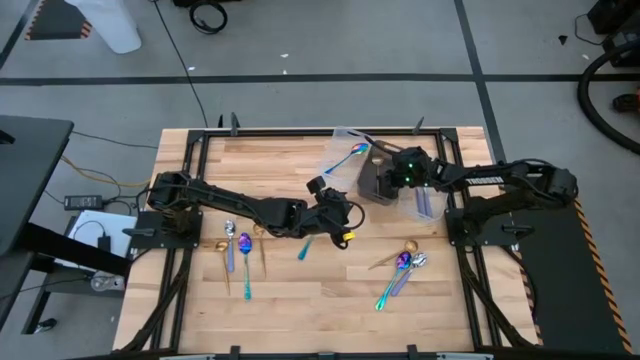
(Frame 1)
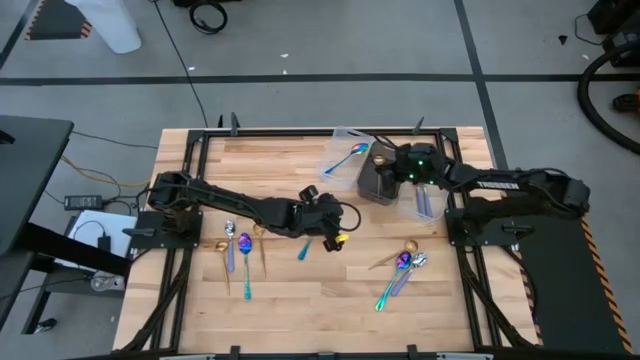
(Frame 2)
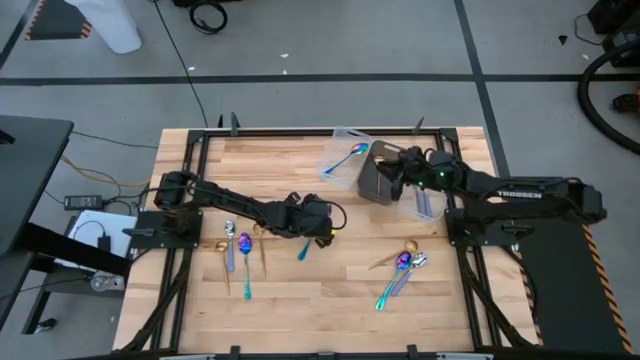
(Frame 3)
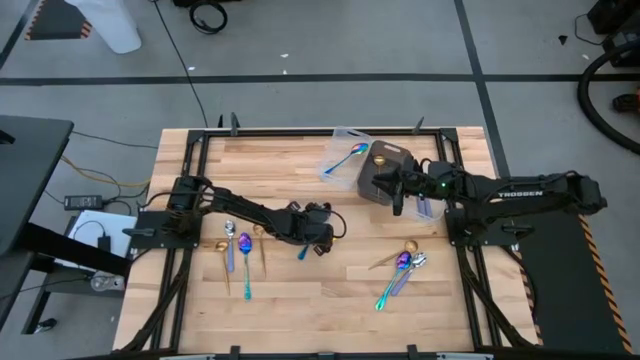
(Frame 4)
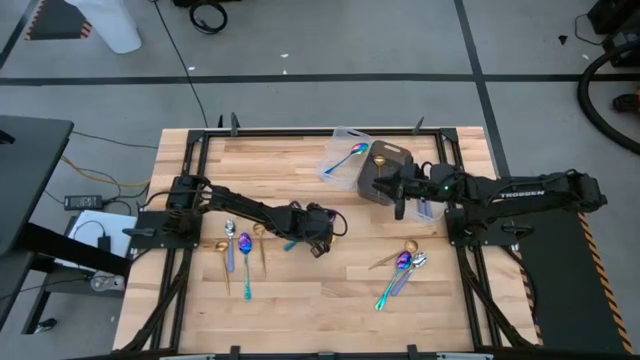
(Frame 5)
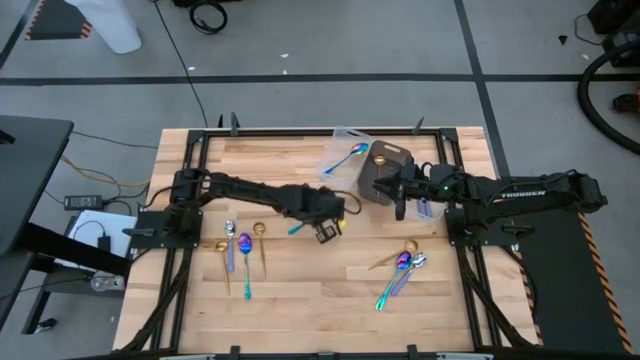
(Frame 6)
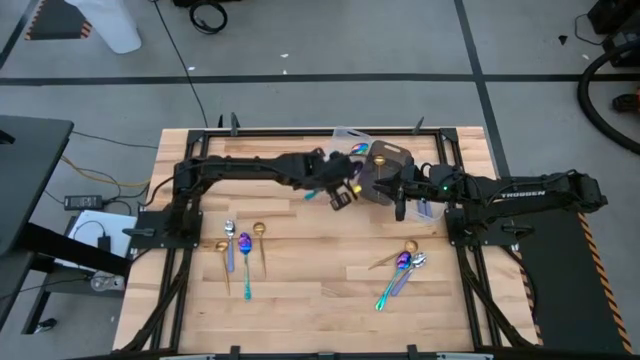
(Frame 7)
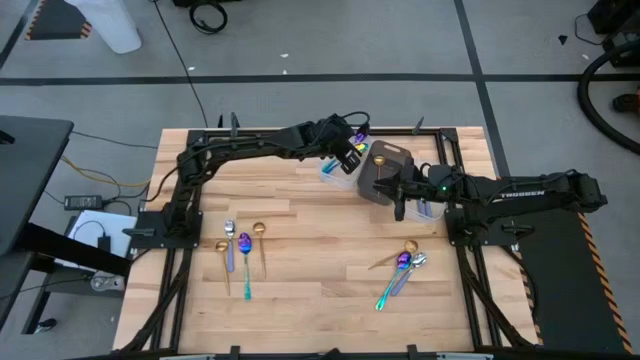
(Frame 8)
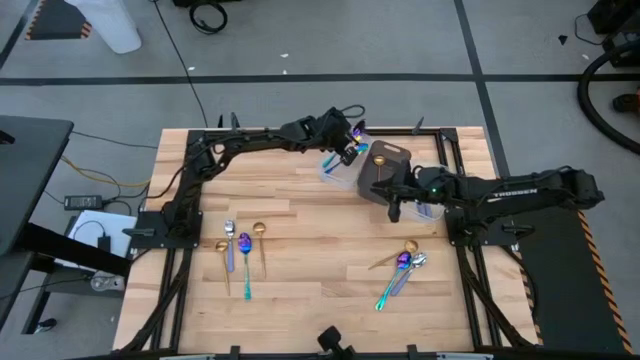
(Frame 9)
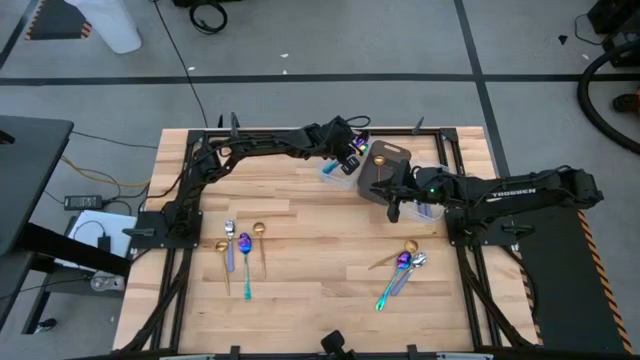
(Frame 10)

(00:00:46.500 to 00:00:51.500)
Task: Sort silverware by color (type)
Put the blue spoon into the left transparent bin

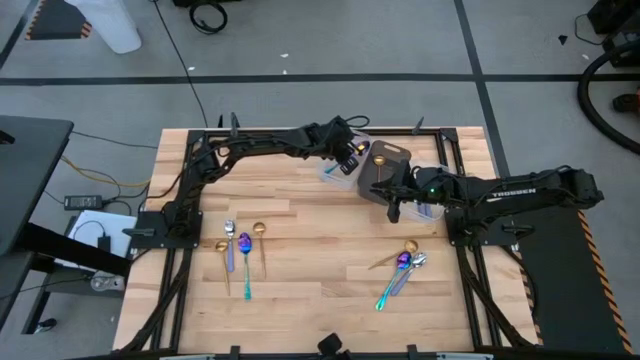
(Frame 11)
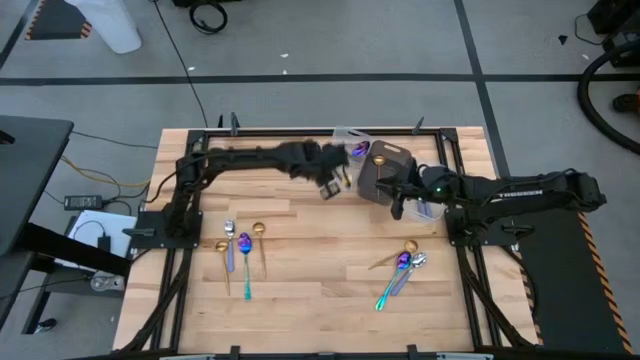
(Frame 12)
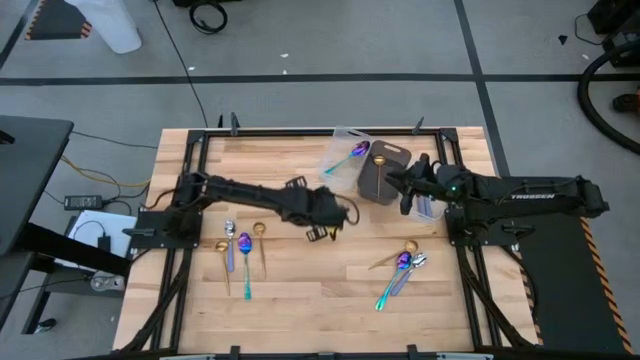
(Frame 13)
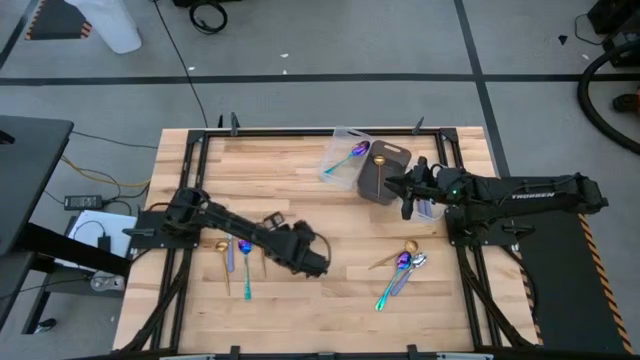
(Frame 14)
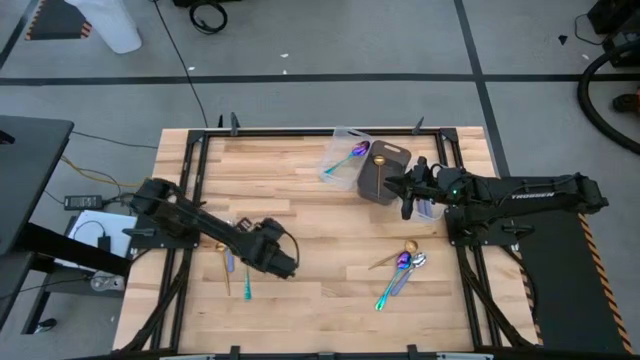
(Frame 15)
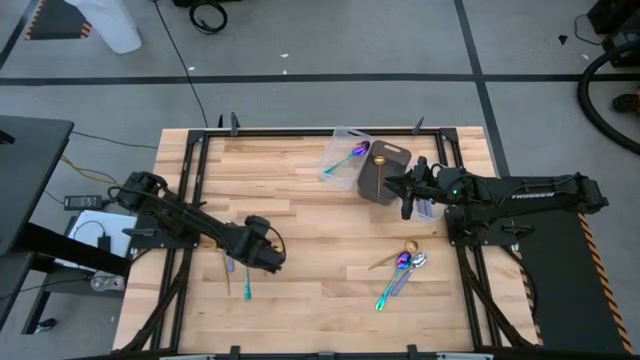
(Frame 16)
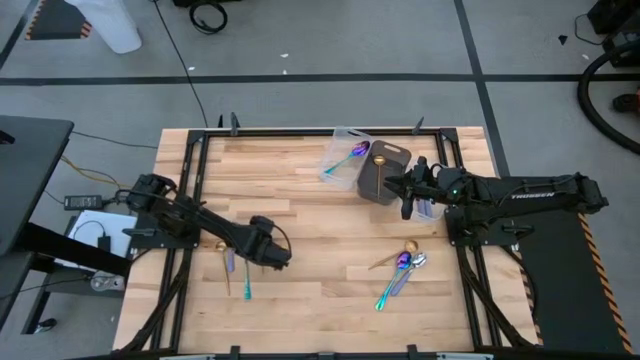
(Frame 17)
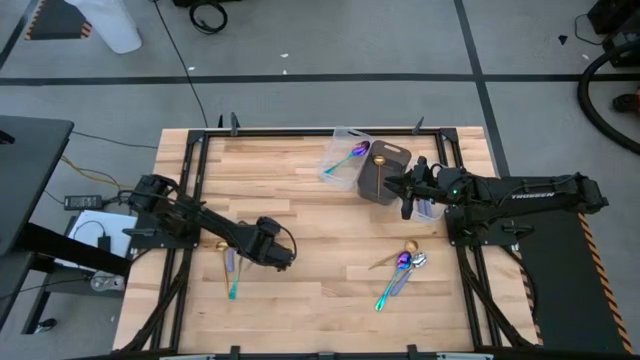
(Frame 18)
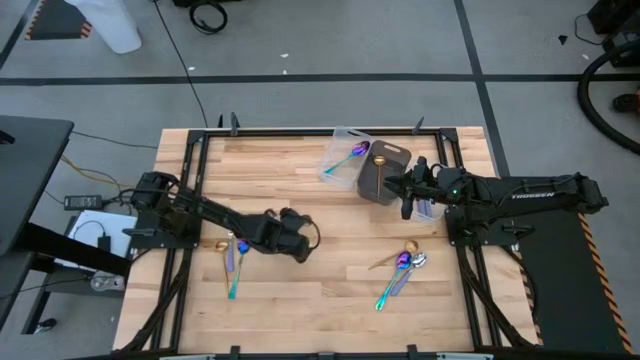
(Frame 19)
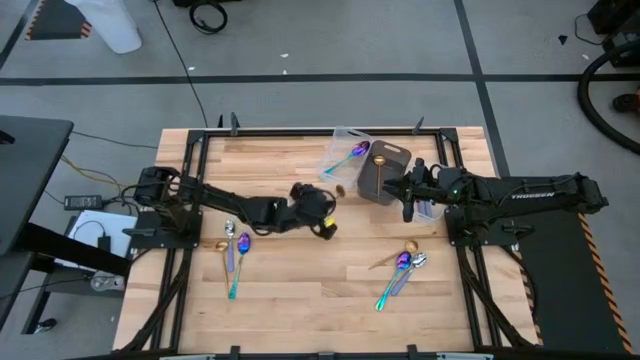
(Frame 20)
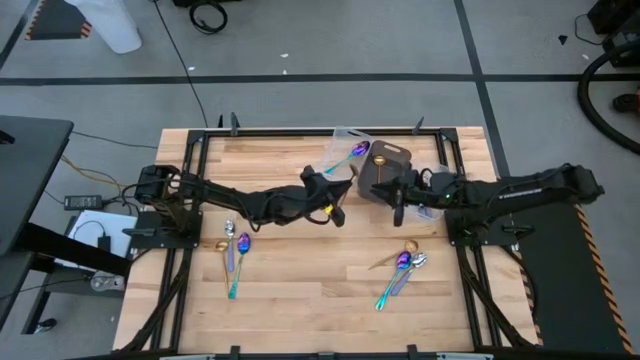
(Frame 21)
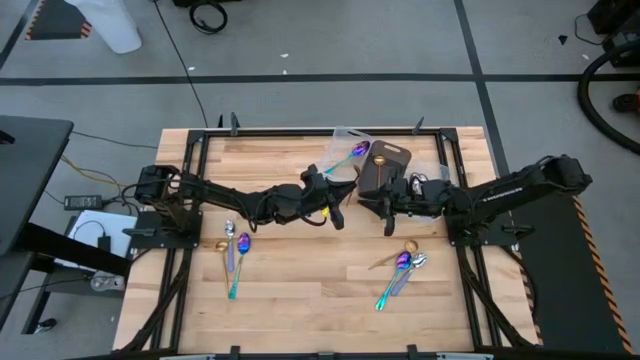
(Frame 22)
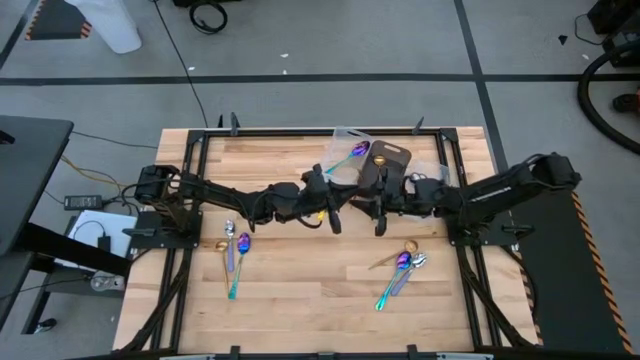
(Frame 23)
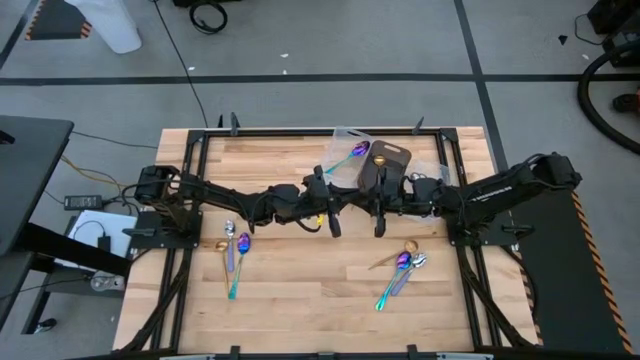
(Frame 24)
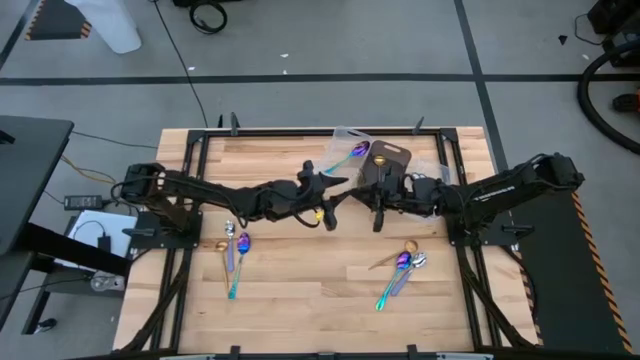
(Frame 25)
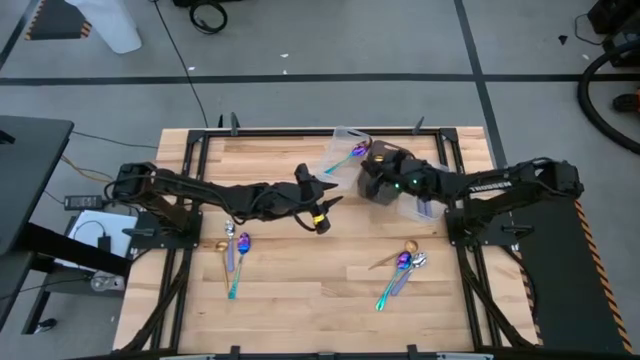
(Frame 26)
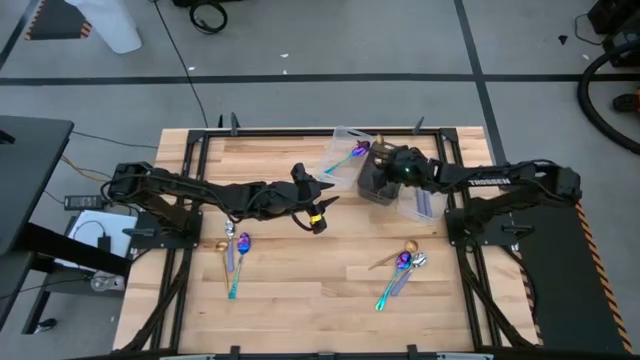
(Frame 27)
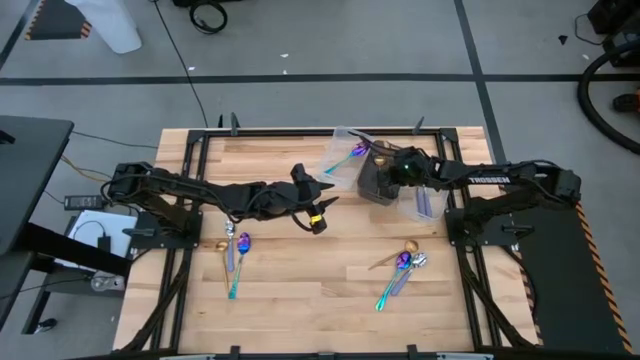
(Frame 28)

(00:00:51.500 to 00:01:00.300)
Put the gold spoon into the black bin

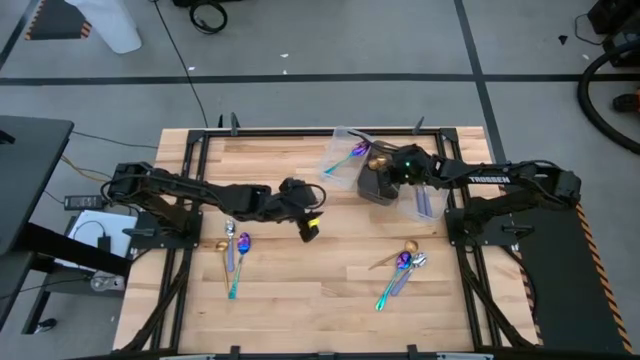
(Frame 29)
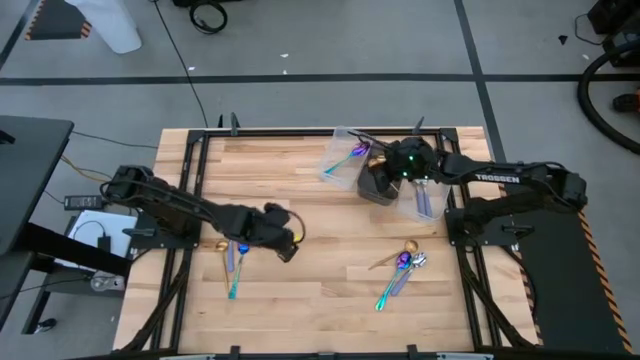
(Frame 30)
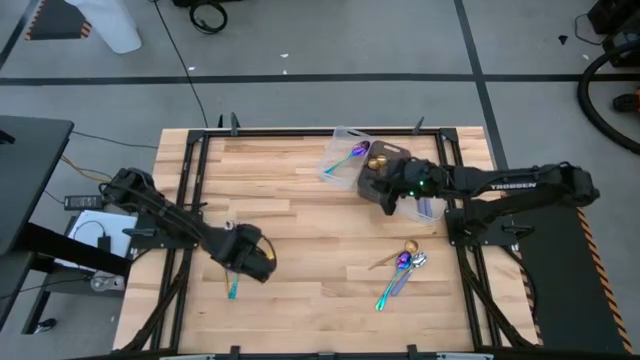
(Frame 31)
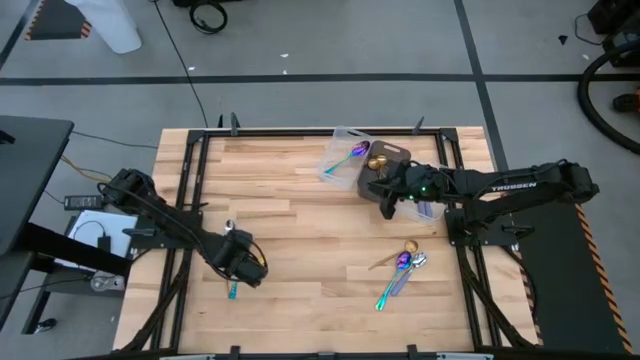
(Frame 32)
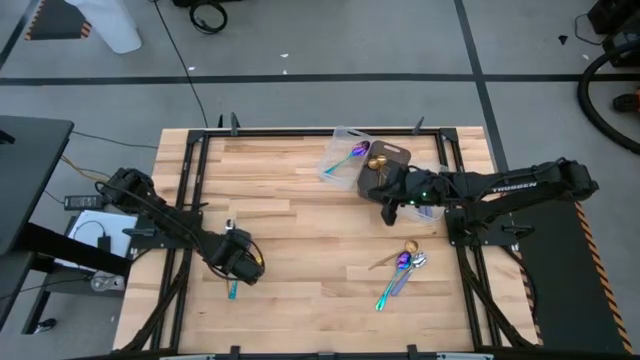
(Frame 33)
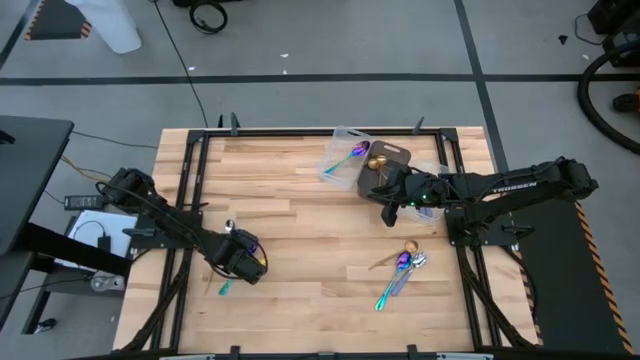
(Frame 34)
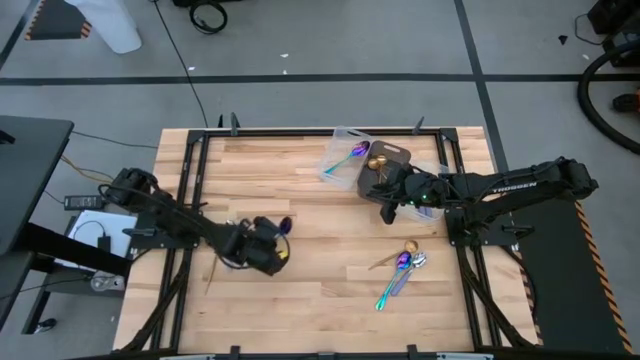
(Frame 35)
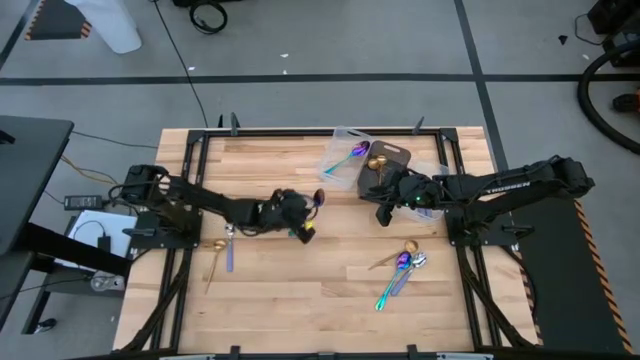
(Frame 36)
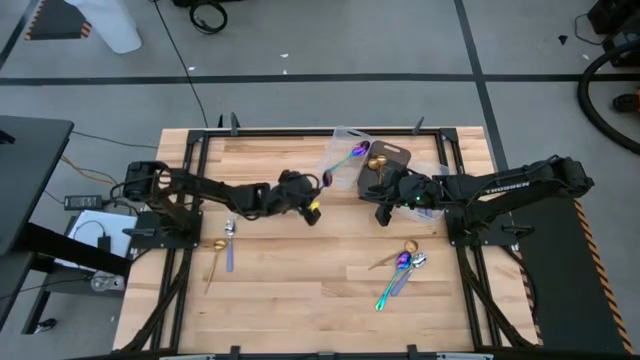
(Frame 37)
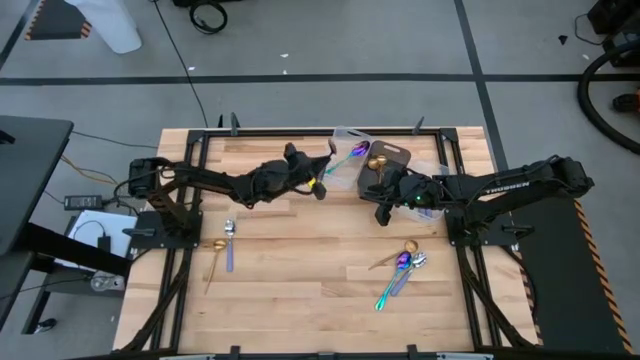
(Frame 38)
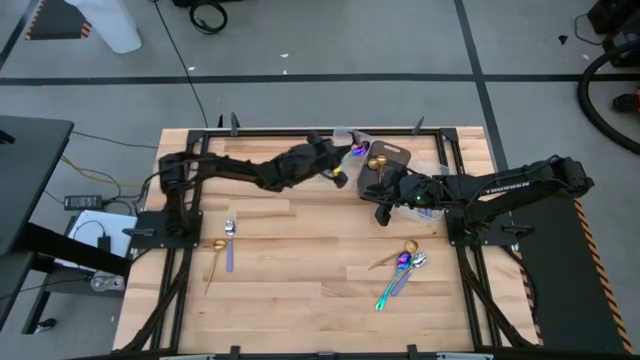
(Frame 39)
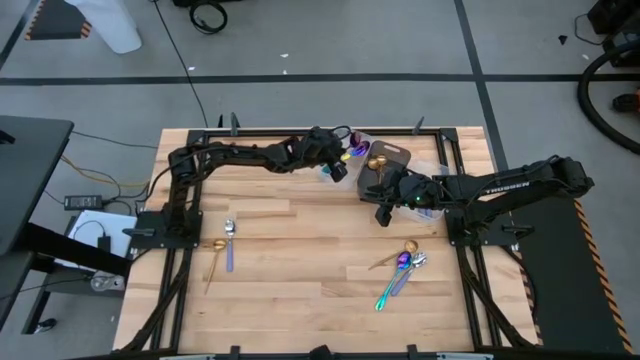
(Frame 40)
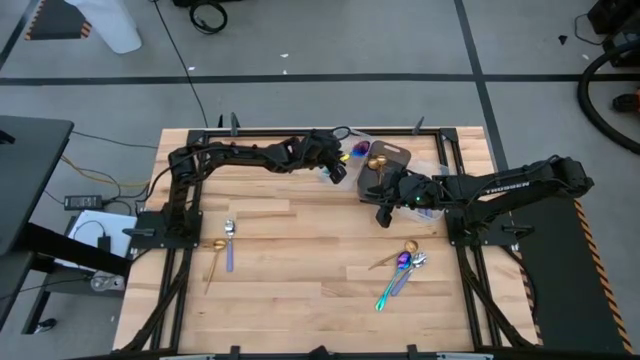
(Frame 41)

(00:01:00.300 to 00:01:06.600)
Put the blue spoon into the left transparent bin
